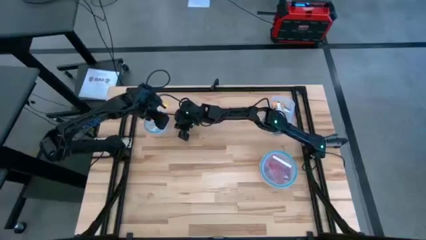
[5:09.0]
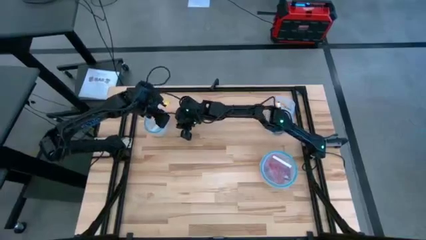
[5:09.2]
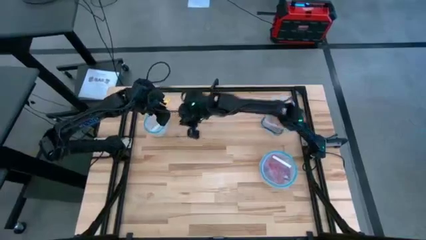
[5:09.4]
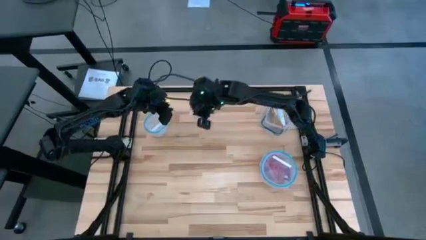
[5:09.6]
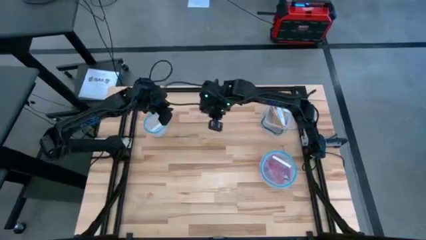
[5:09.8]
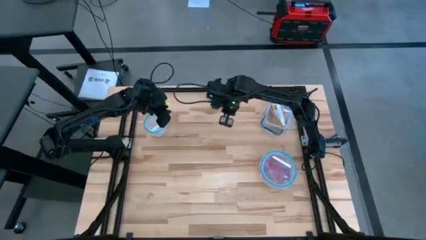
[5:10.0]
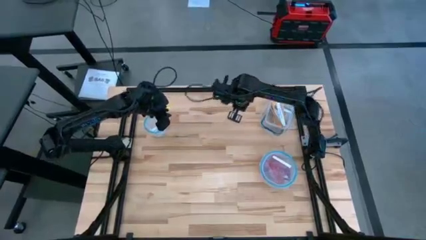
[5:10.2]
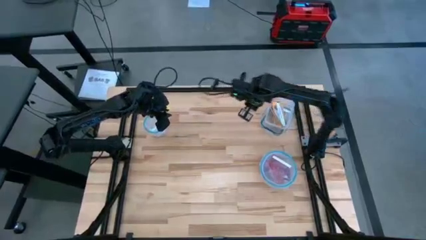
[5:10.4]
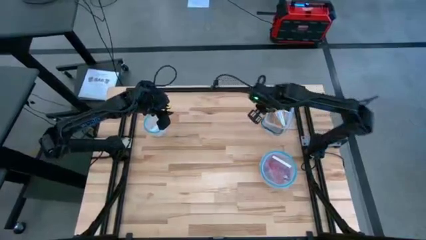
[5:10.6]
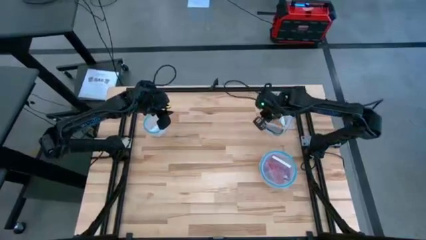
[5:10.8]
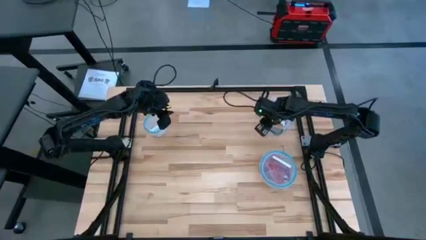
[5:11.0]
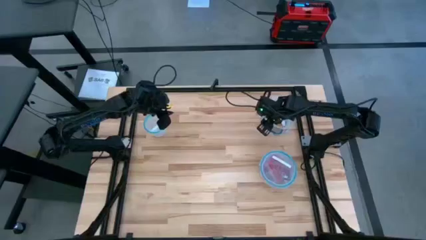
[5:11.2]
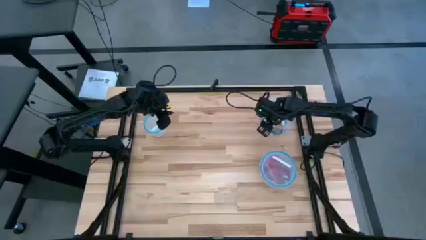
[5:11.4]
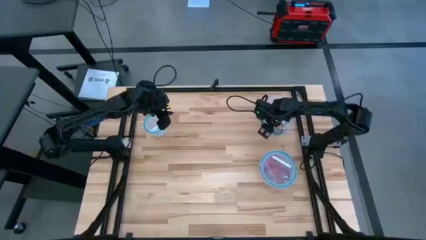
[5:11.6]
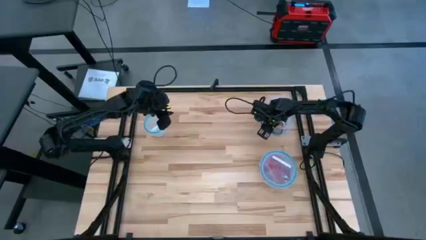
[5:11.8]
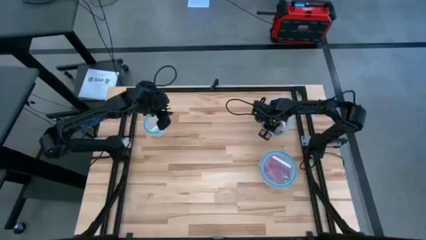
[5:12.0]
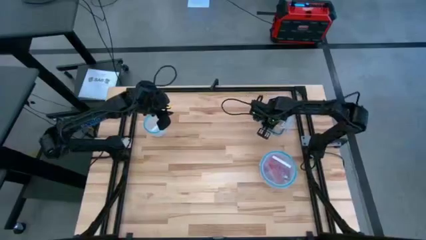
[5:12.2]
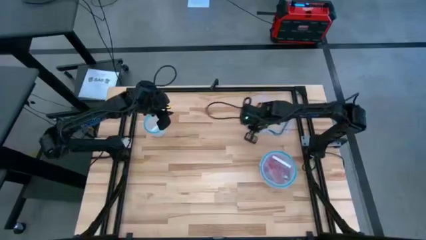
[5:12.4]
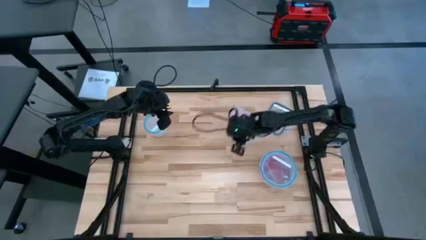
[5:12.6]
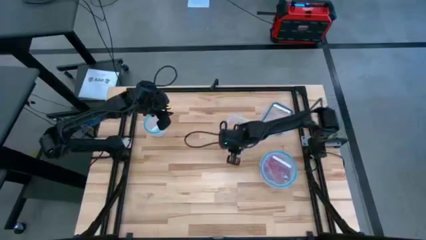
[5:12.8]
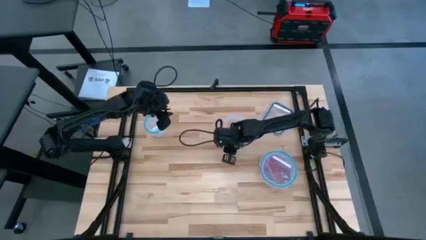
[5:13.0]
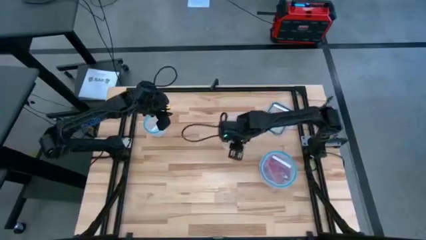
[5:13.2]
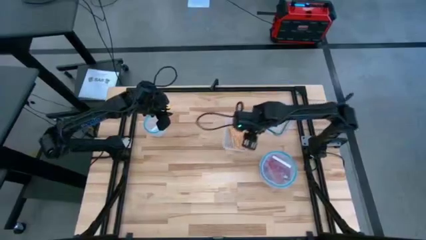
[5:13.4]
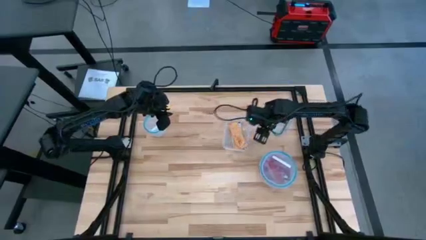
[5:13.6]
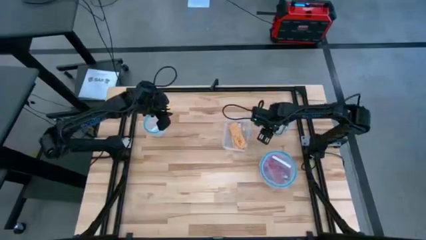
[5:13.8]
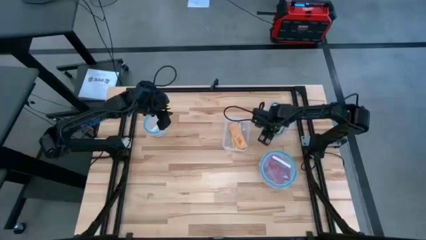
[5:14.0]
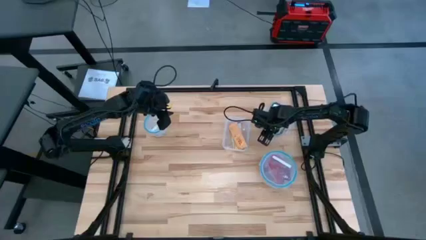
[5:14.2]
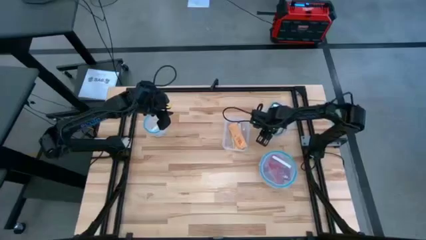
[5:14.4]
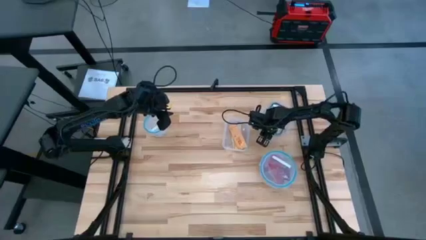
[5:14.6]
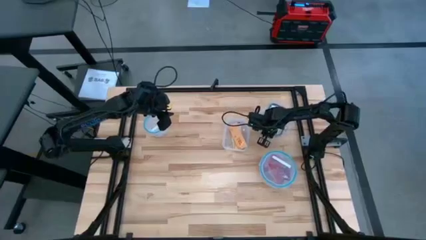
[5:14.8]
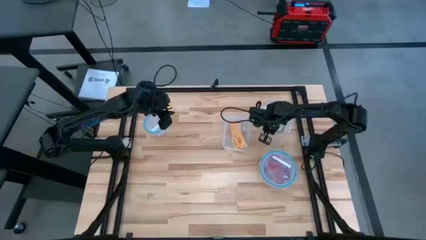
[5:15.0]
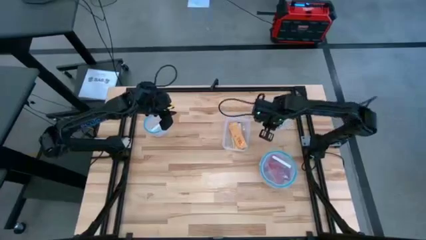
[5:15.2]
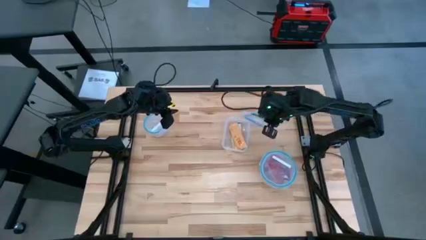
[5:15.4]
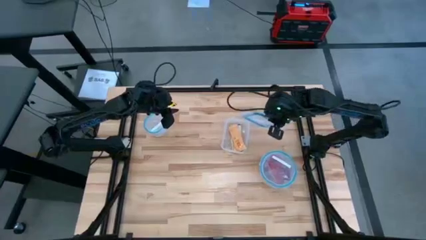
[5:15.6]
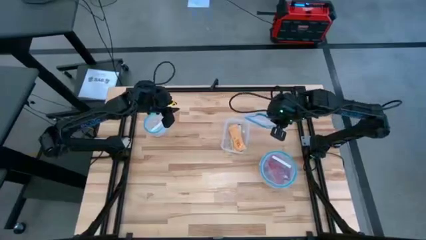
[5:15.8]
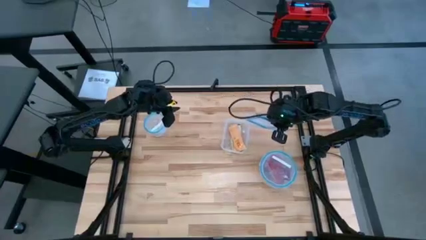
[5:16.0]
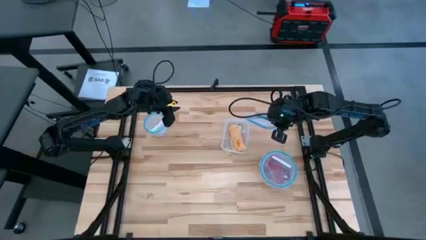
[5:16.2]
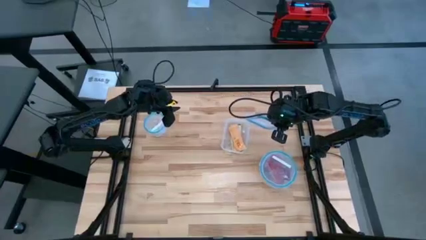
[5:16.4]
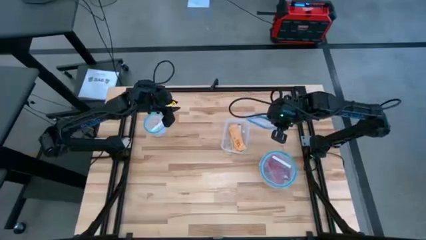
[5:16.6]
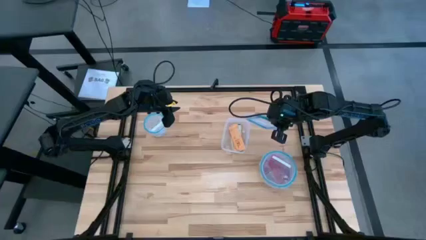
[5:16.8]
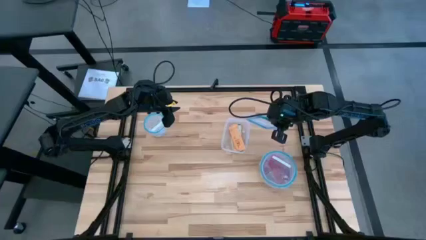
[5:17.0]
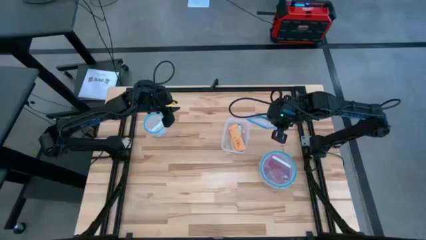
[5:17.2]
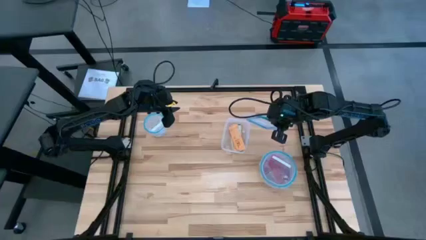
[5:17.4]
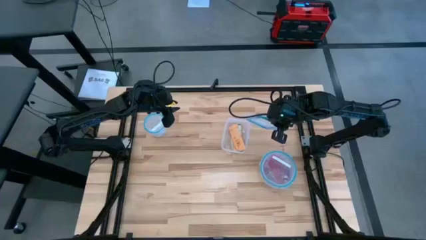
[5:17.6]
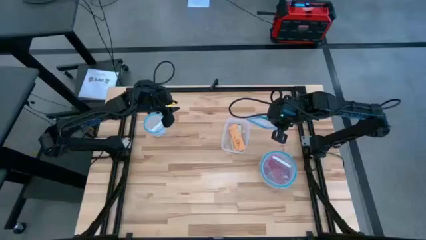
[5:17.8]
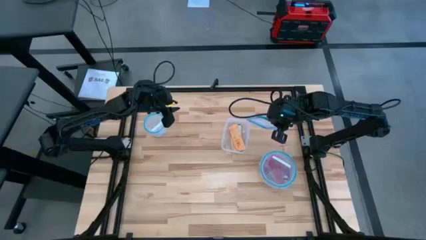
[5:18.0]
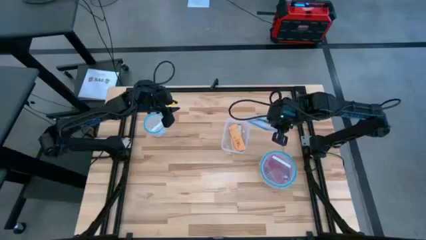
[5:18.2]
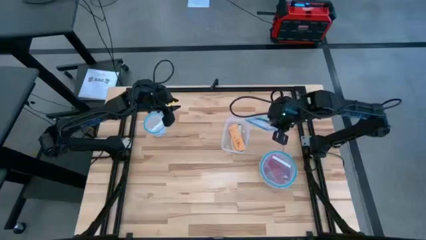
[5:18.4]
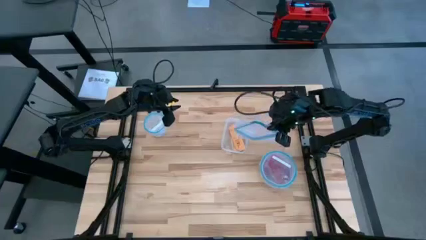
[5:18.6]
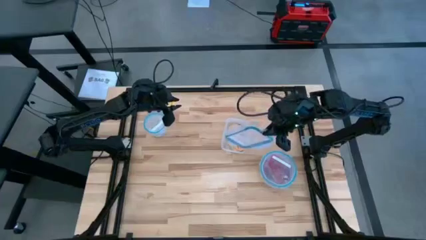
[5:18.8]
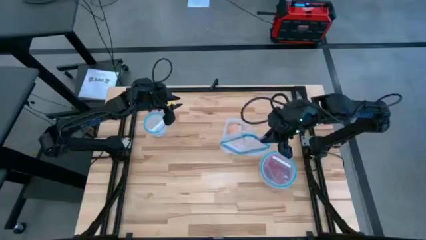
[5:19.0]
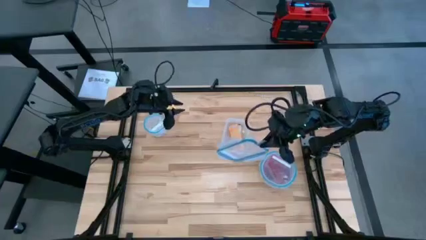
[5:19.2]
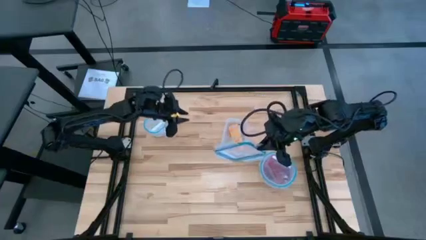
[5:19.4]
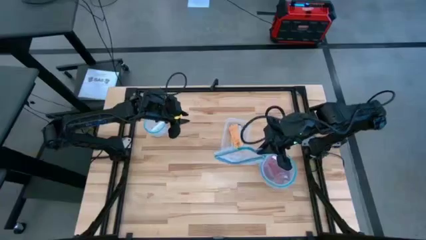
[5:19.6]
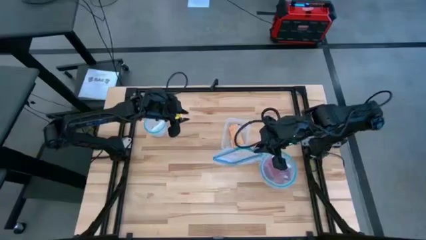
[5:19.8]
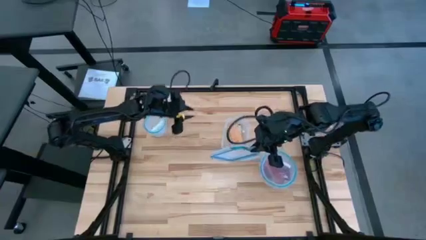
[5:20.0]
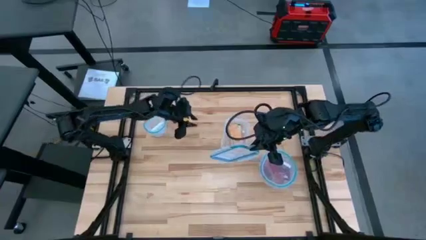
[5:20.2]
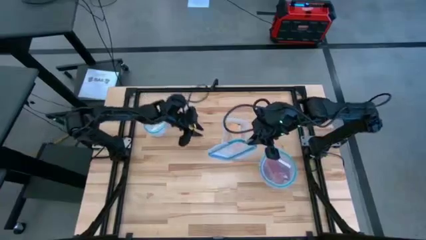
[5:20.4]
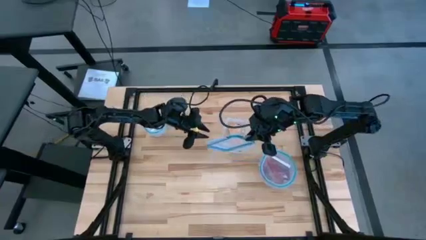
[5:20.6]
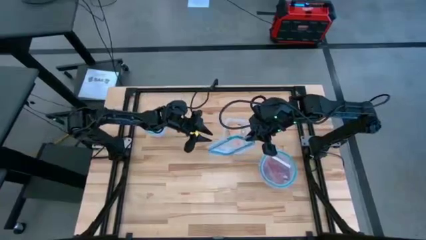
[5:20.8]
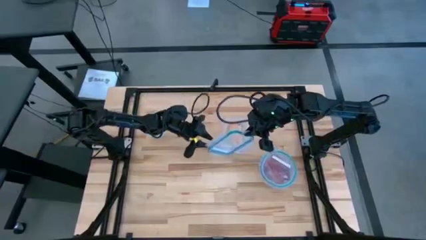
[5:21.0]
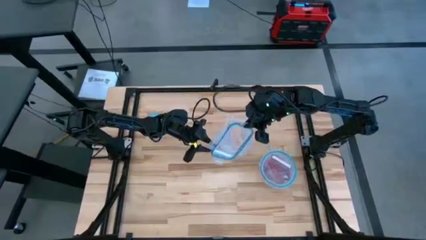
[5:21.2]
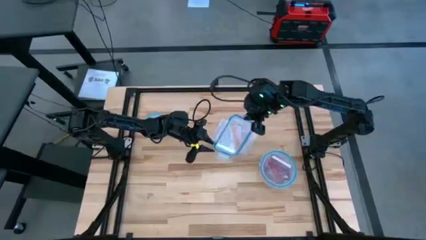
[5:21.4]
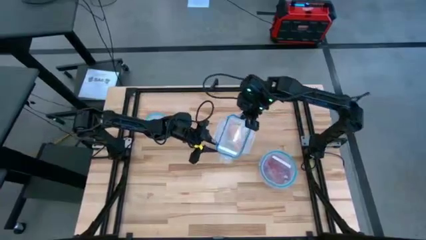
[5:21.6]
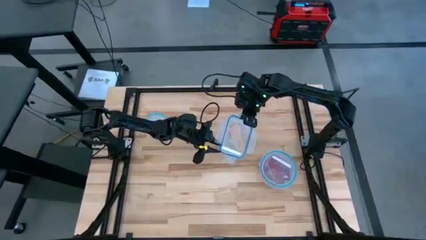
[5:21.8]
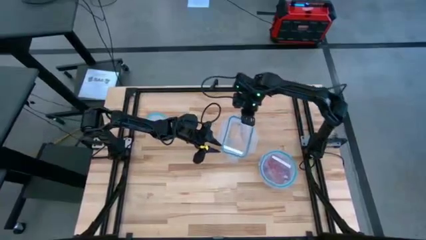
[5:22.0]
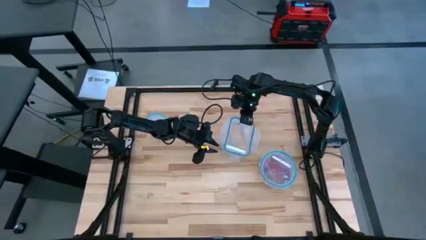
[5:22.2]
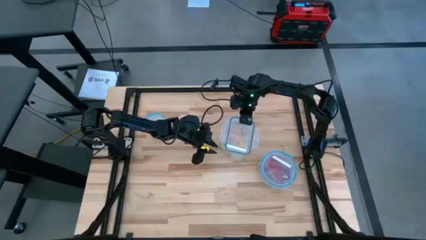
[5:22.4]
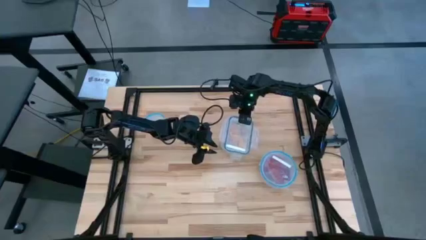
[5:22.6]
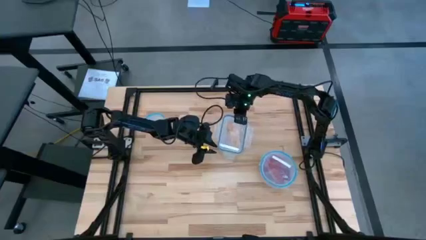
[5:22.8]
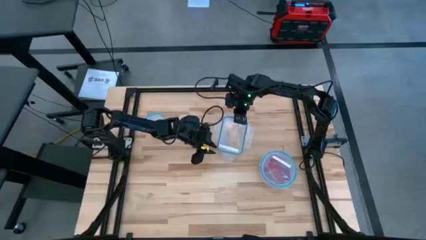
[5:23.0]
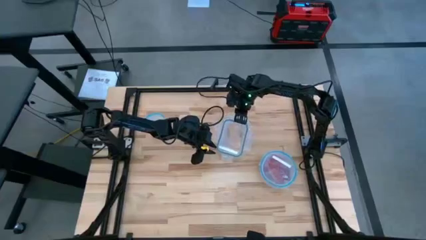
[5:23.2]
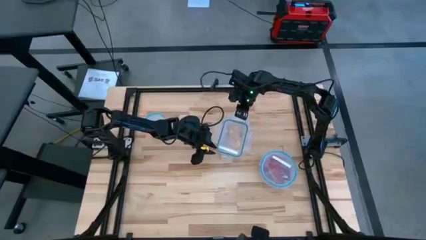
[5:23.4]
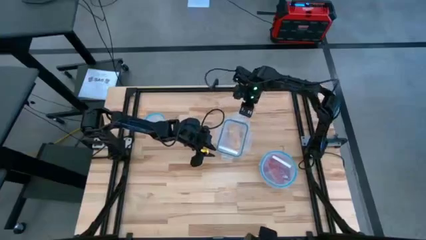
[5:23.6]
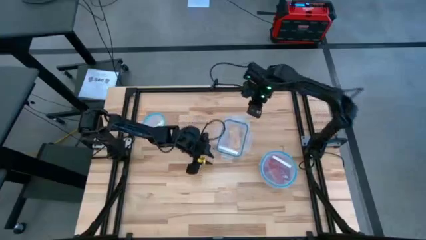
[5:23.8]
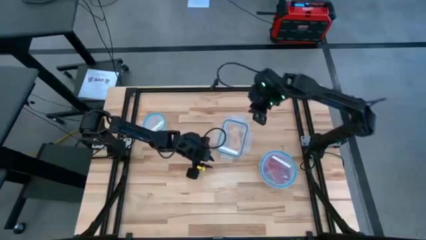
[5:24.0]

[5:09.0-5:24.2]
Task: Sort candy
Close the rectangular transparent bin
